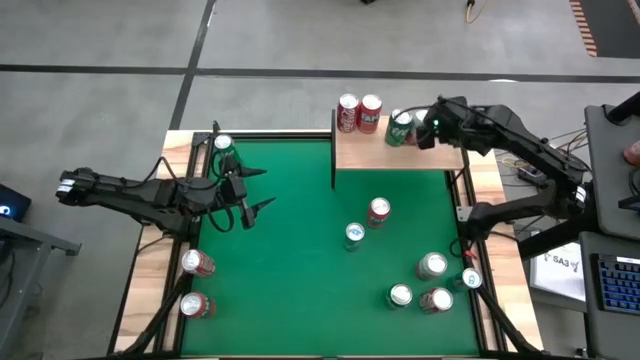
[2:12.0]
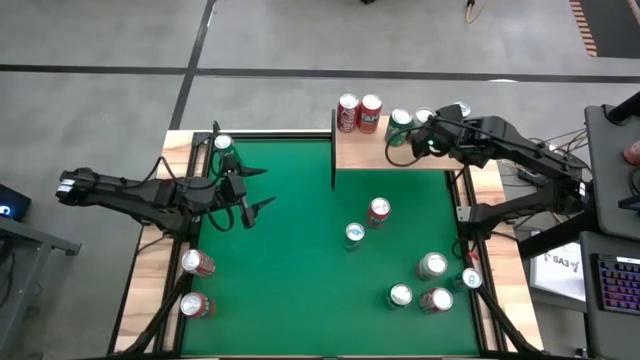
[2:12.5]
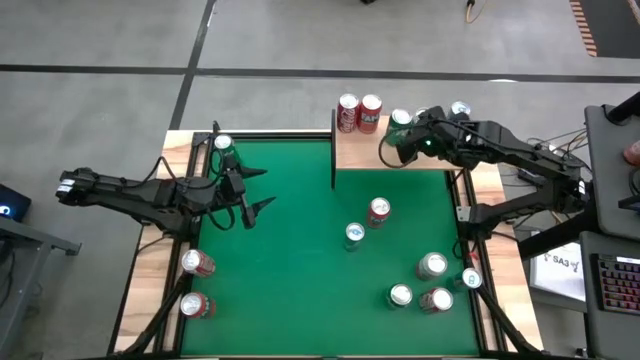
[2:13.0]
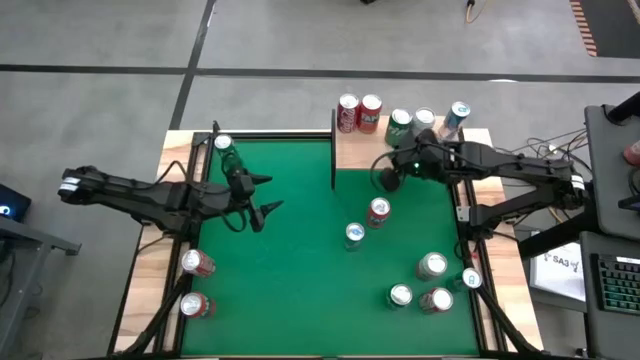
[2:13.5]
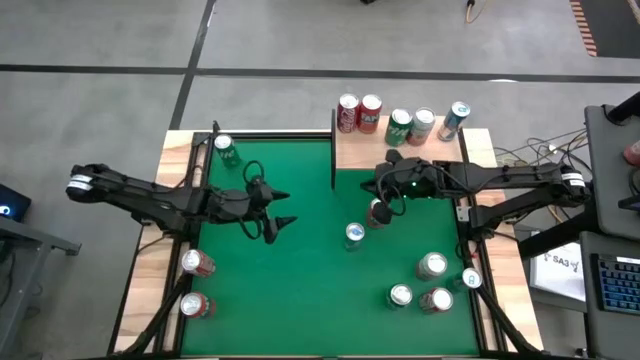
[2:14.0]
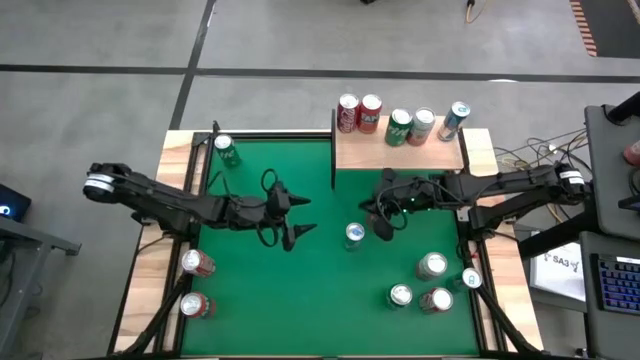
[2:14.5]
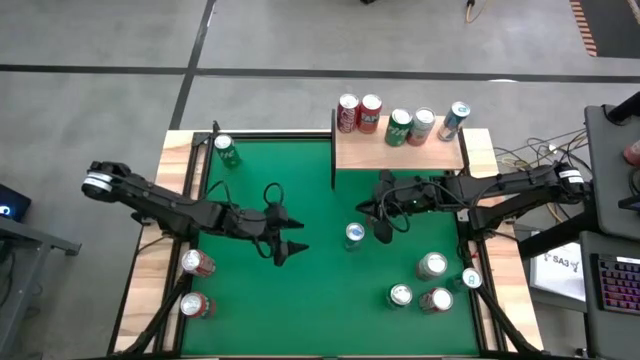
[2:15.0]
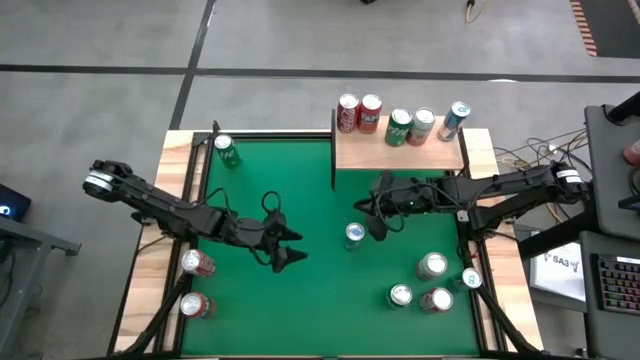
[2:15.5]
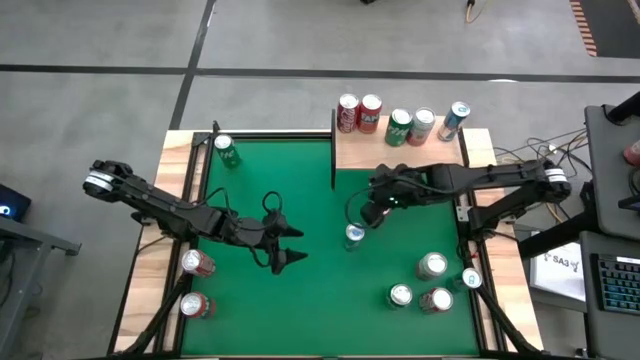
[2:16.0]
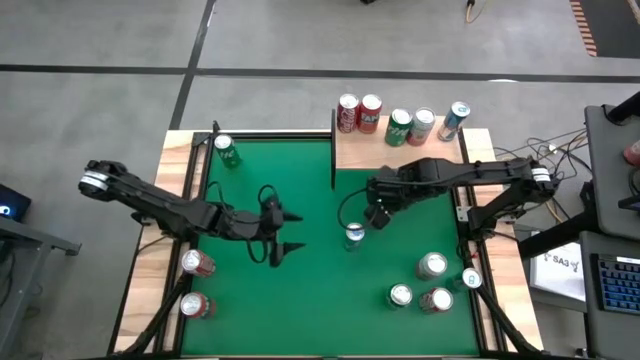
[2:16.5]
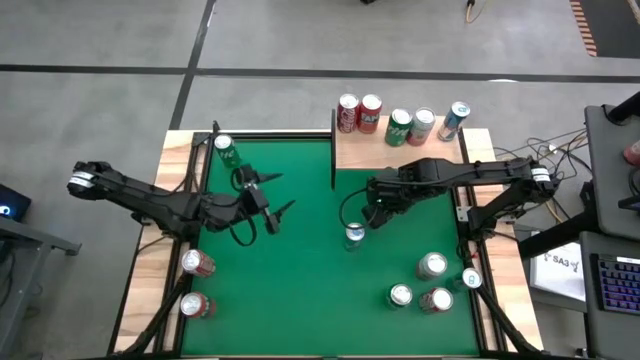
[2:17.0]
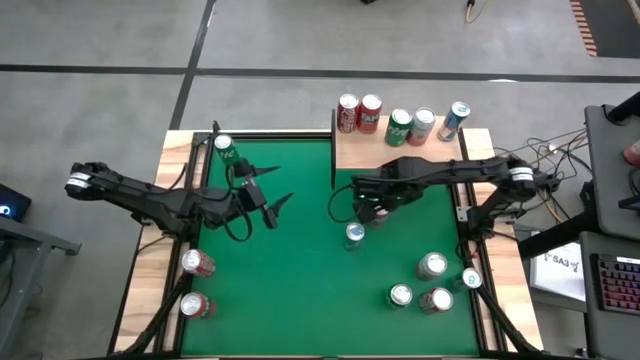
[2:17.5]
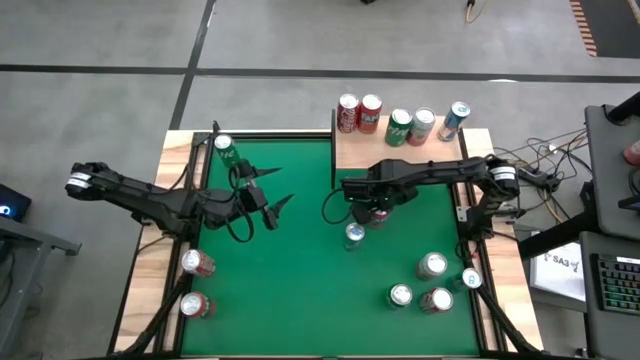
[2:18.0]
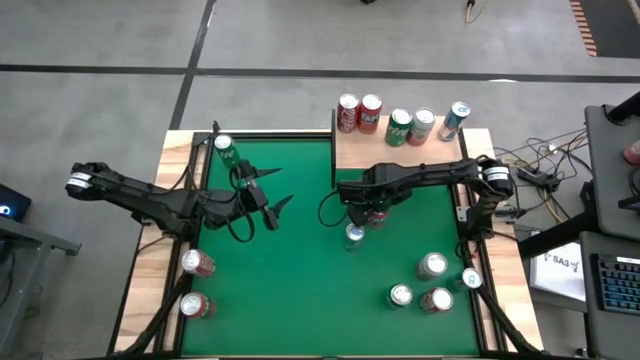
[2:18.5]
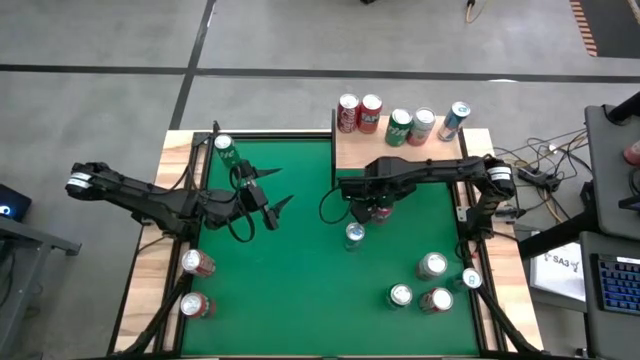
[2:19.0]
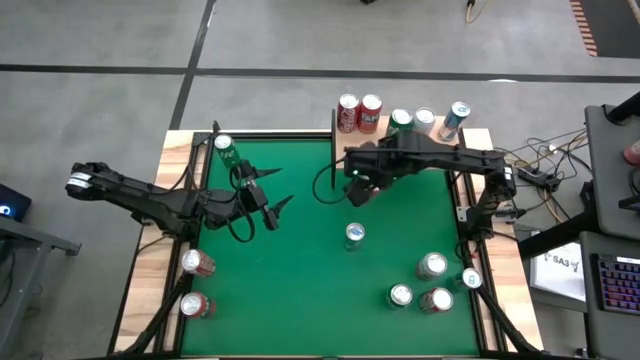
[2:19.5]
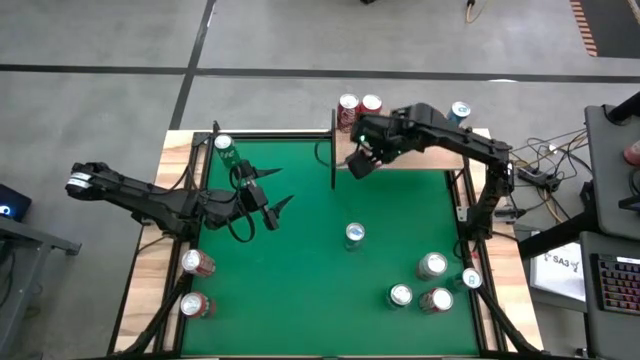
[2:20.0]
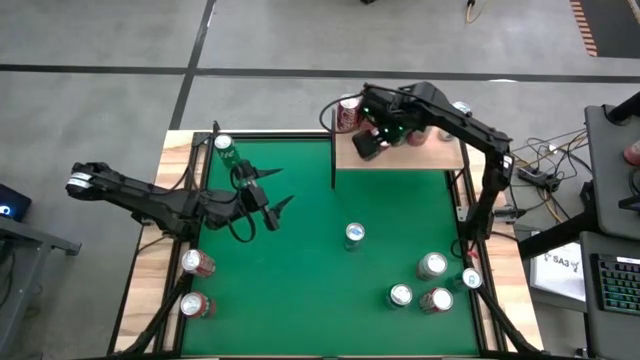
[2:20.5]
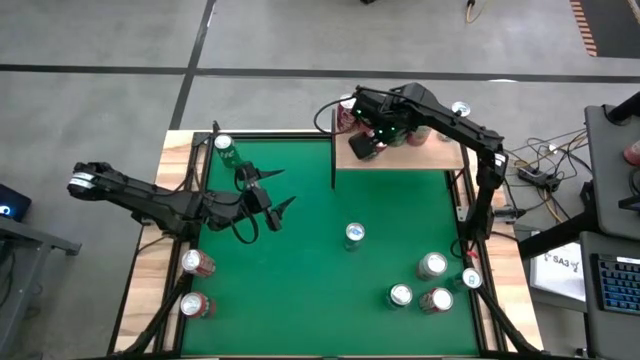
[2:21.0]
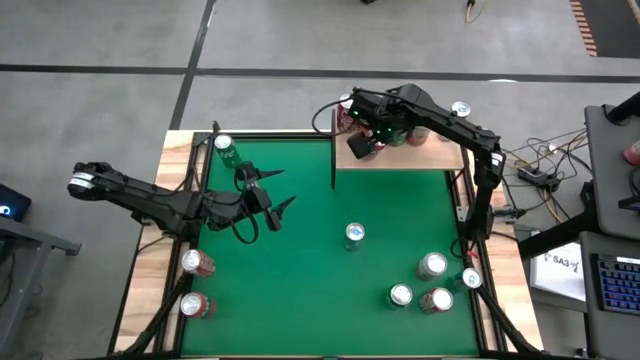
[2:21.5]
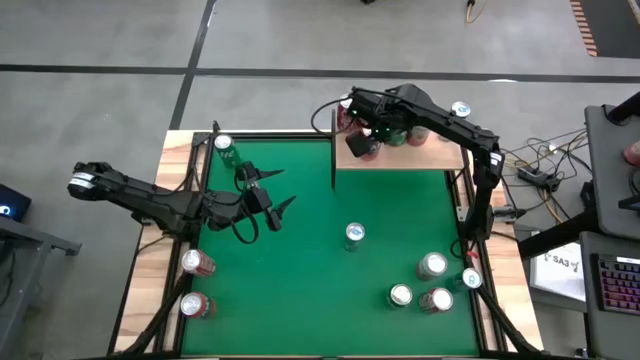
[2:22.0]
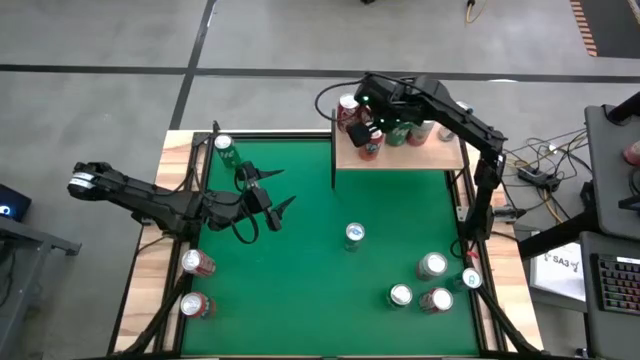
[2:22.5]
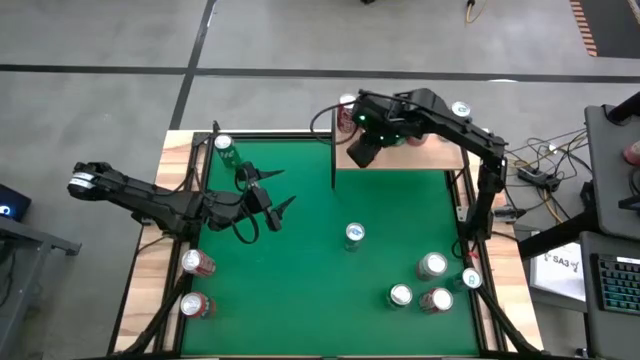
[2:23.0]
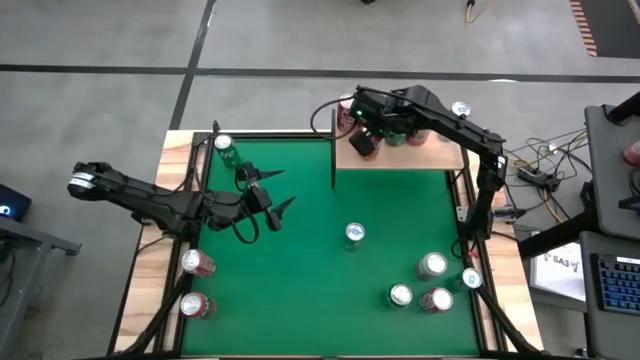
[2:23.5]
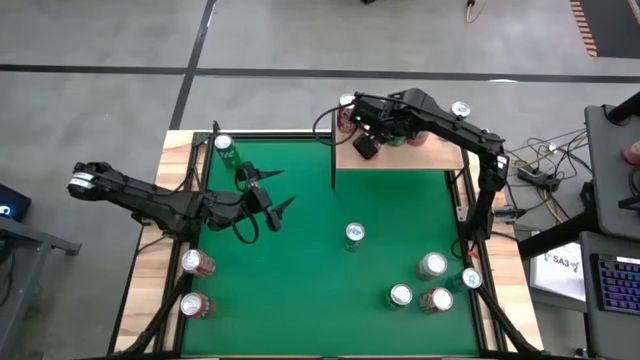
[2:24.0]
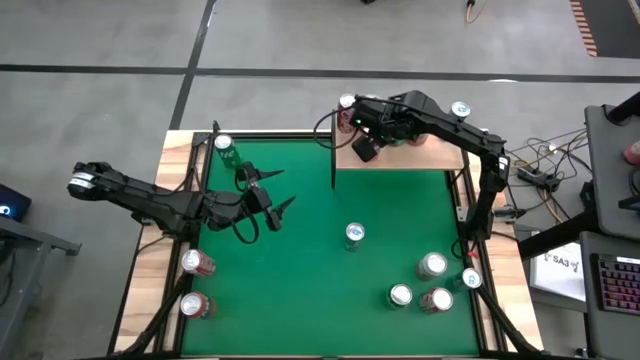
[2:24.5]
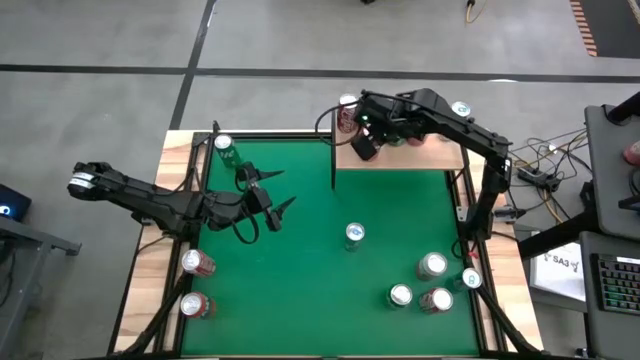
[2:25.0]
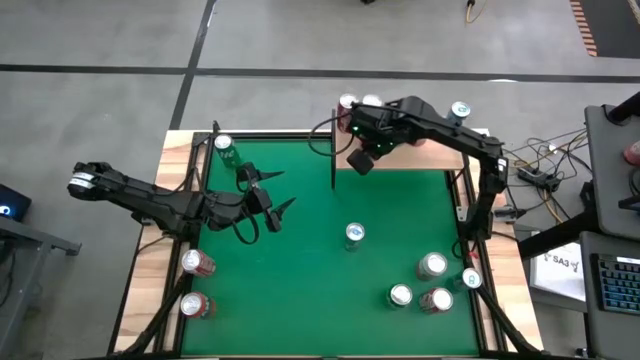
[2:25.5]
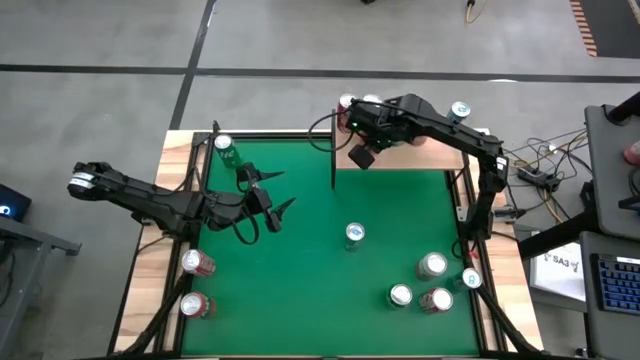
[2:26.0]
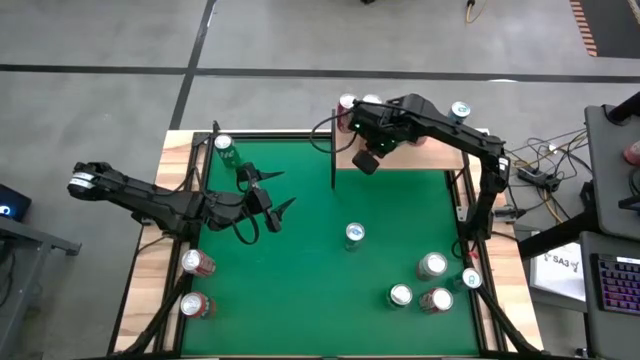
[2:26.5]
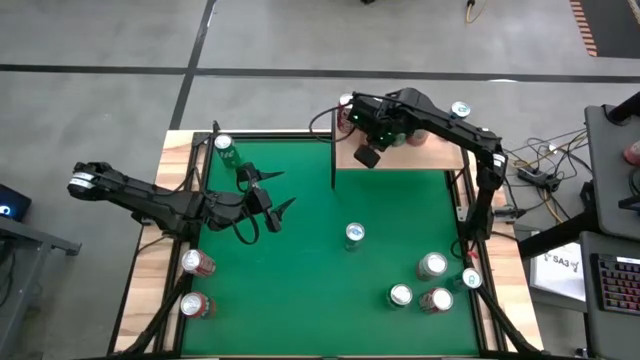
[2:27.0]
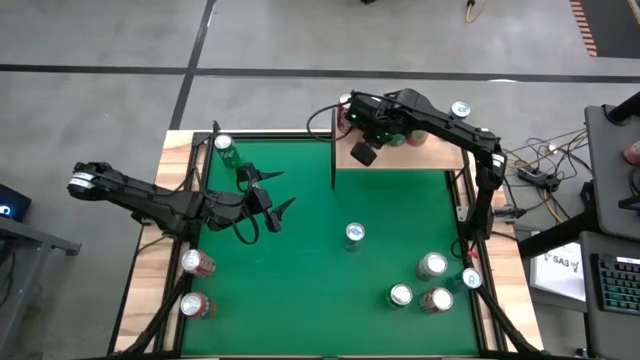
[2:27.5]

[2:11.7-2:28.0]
Task: Place canned beverage on shelf
Put the right red soda can on the shelf aligned with the other red soda can

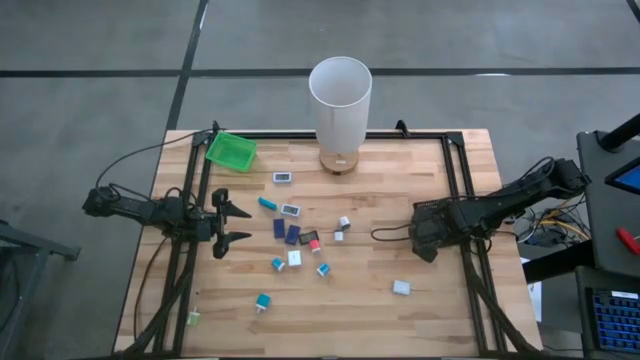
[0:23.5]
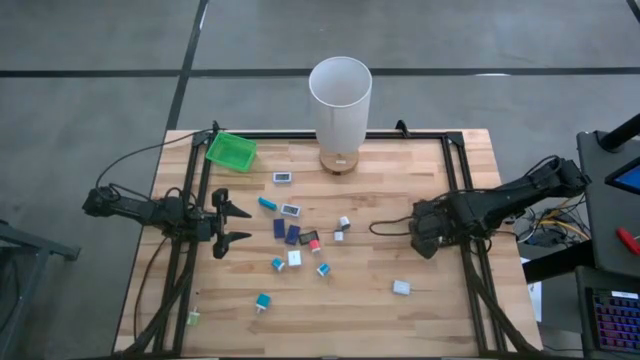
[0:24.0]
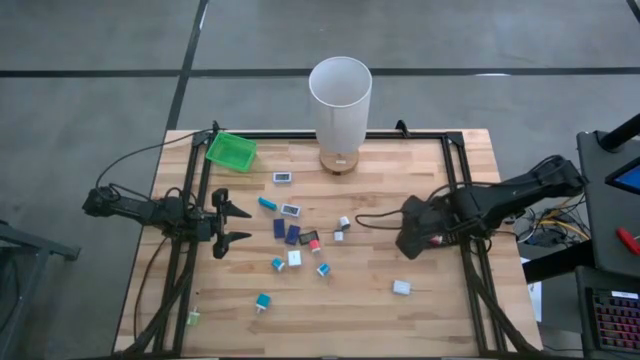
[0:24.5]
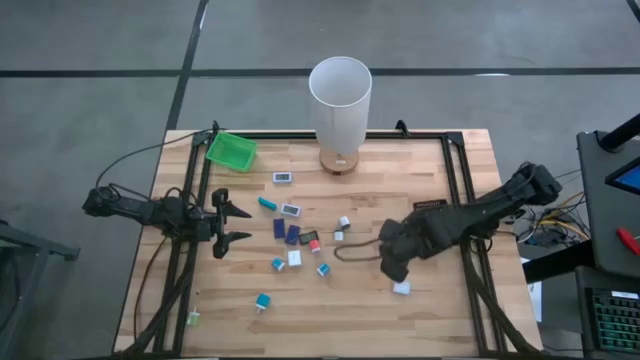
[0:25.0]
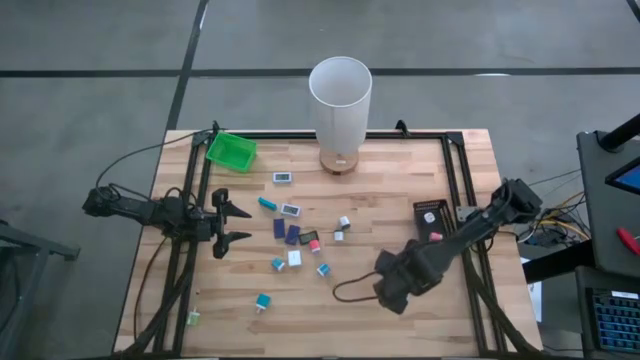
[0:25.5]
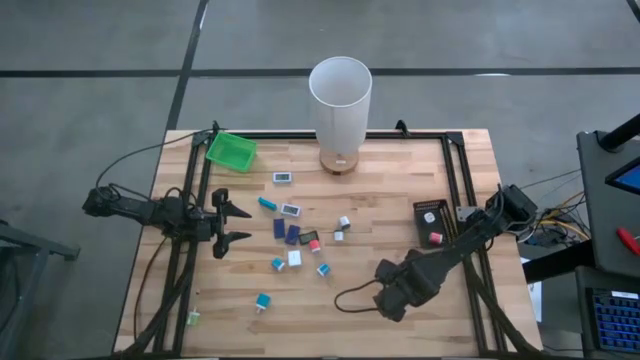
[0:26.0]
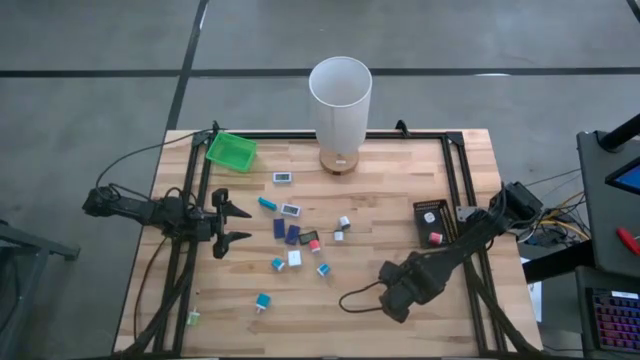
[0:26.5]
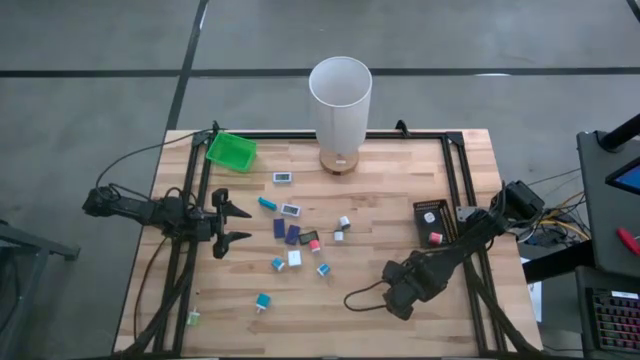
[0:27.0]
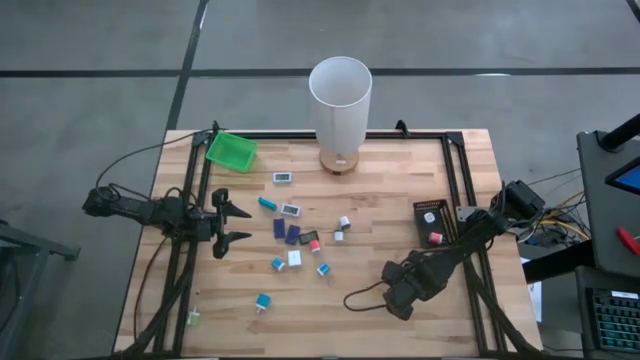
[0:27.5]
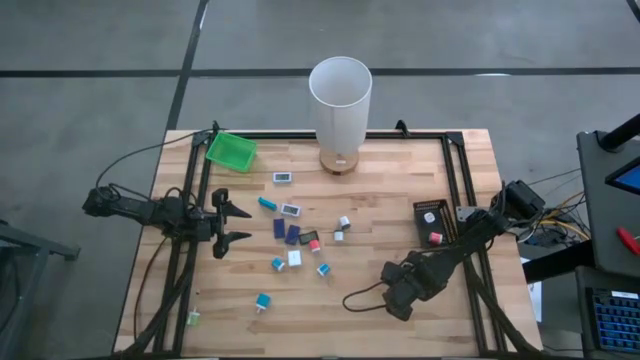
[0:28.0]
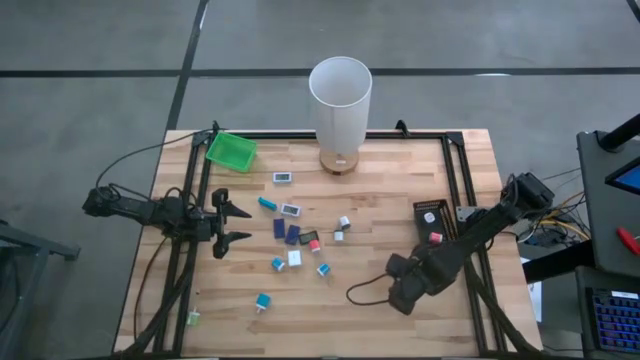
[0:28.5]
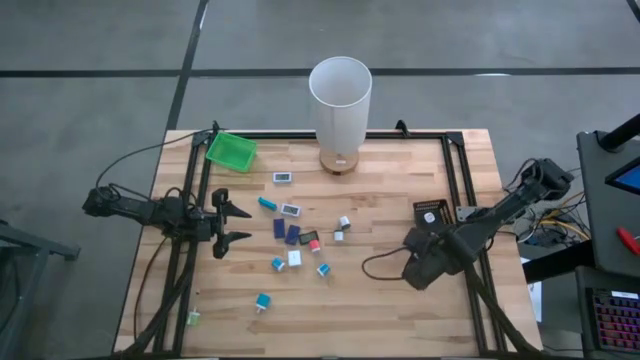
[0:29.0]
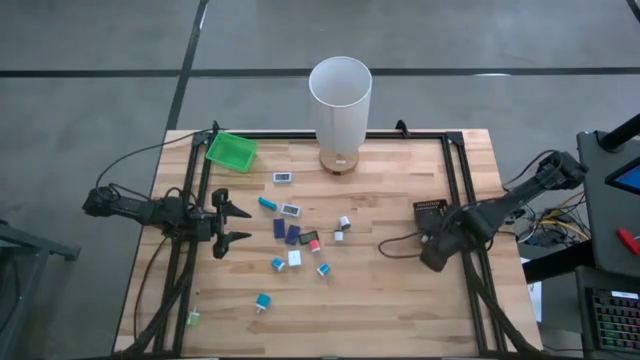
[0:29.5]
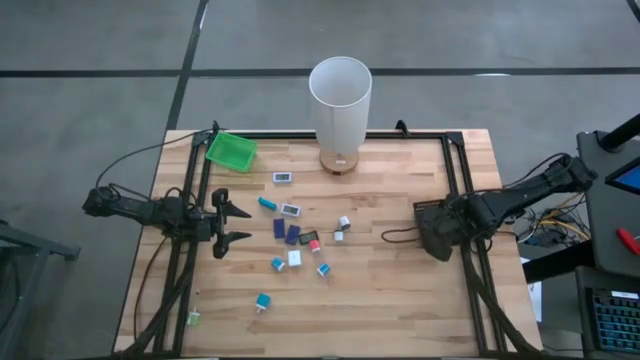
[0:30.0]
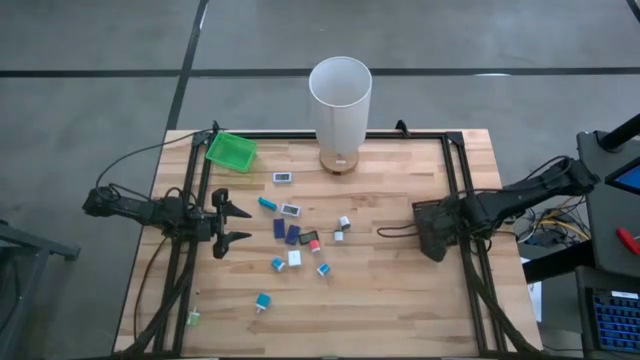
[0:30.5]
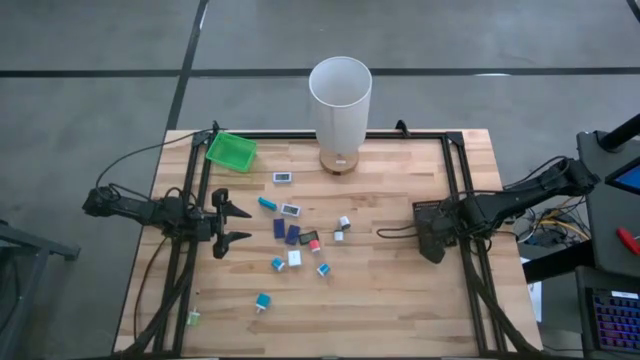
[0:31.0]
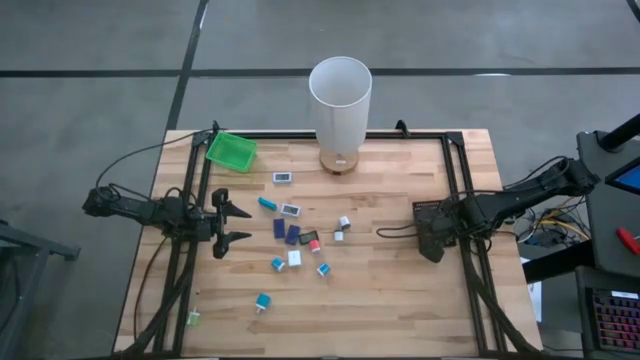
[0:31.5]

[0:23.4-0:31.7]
Task: Pick & Place Office items
Put the right white charger adapter into the black bin
